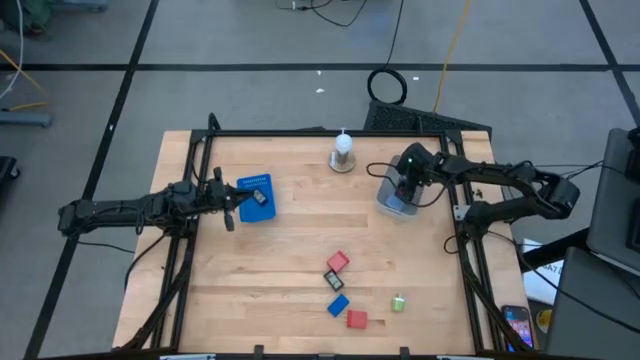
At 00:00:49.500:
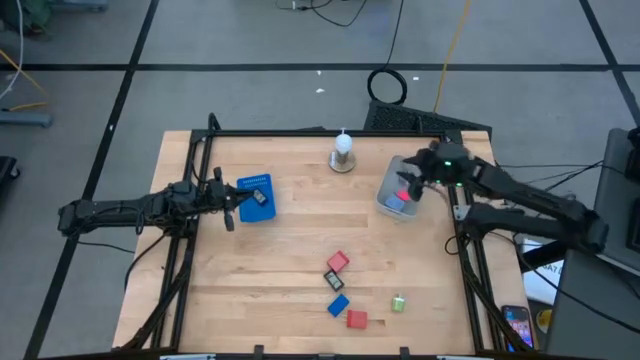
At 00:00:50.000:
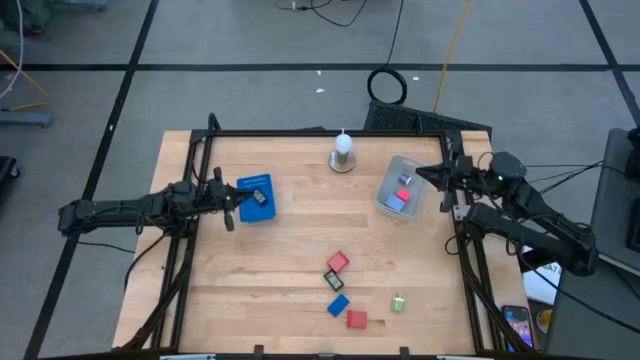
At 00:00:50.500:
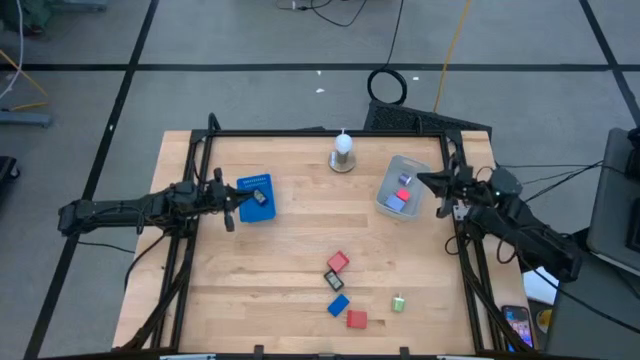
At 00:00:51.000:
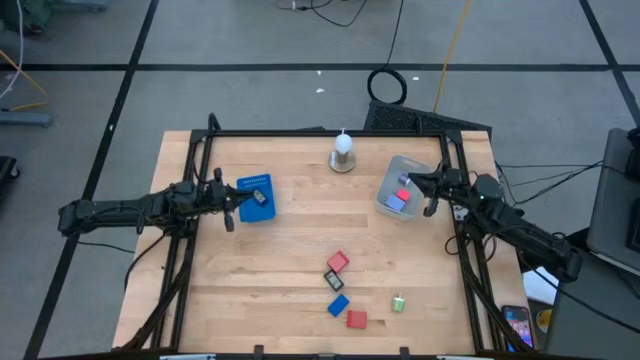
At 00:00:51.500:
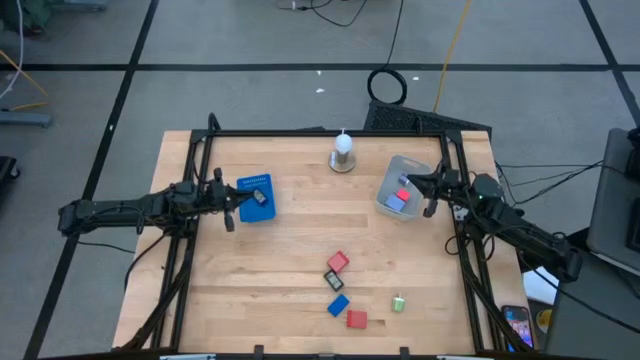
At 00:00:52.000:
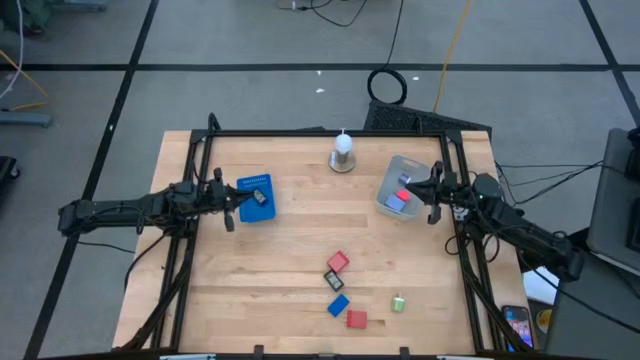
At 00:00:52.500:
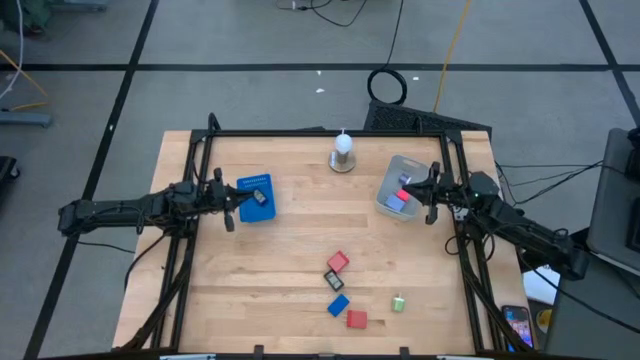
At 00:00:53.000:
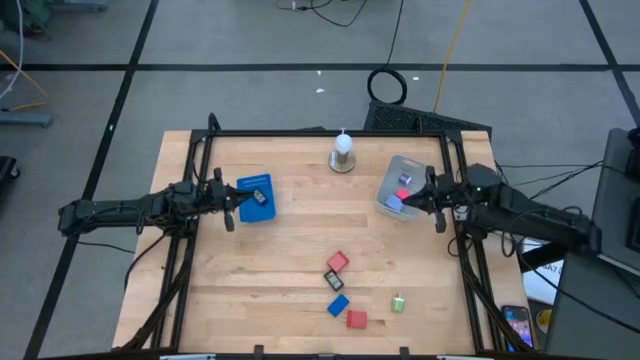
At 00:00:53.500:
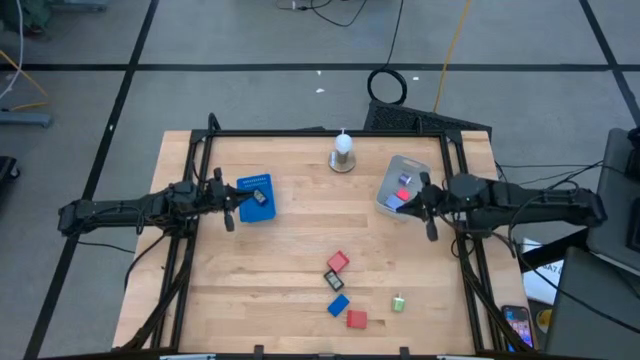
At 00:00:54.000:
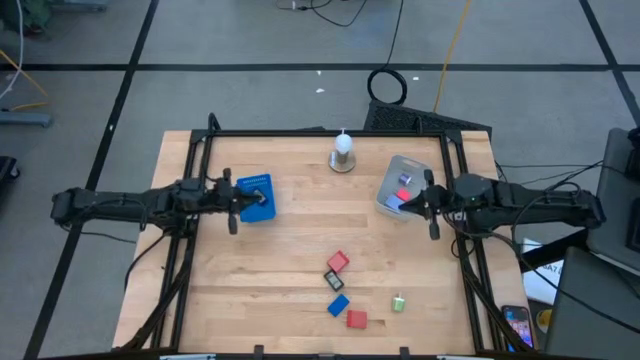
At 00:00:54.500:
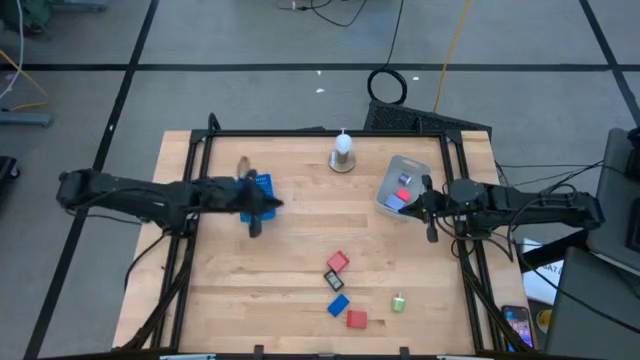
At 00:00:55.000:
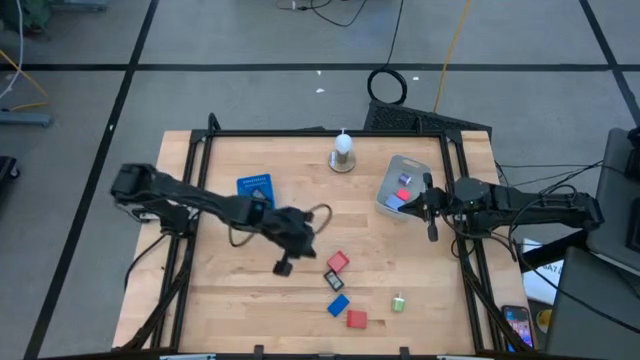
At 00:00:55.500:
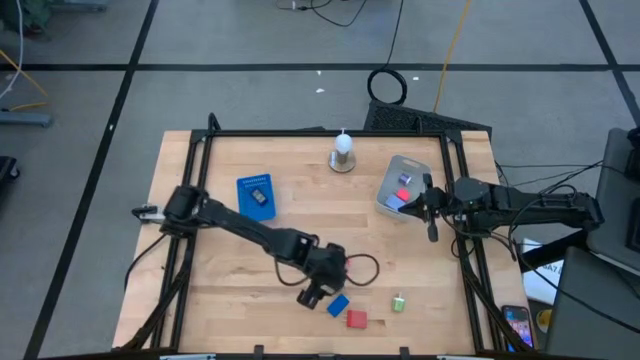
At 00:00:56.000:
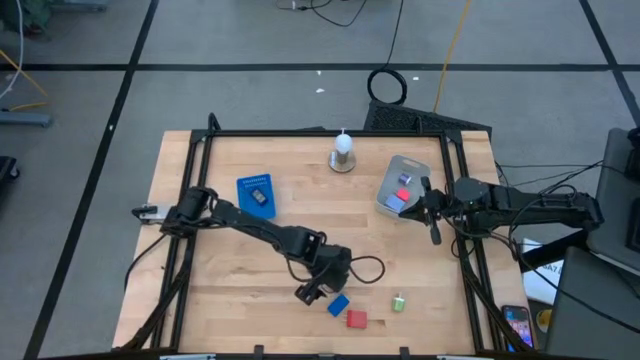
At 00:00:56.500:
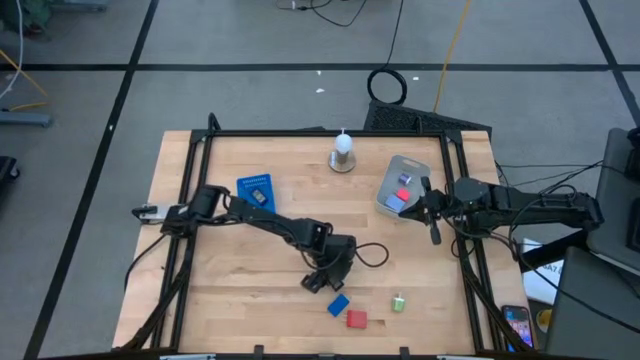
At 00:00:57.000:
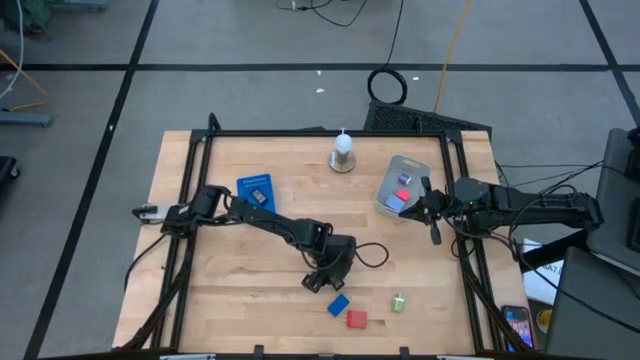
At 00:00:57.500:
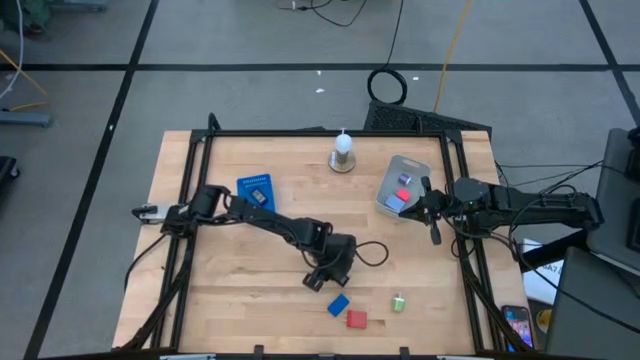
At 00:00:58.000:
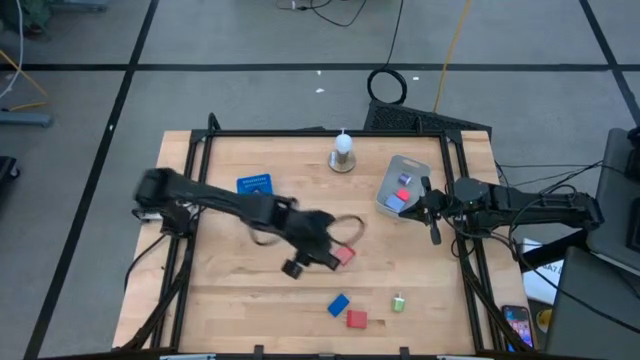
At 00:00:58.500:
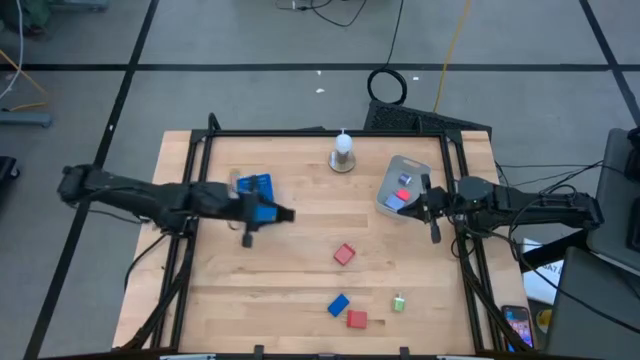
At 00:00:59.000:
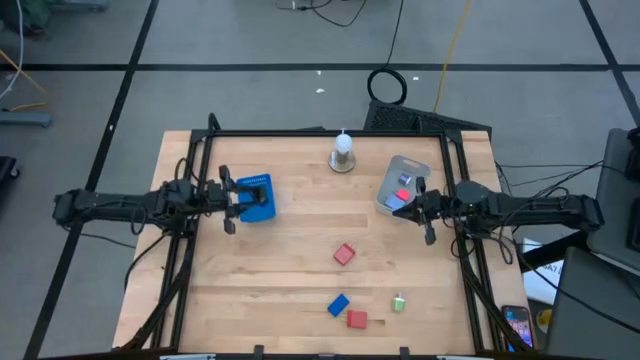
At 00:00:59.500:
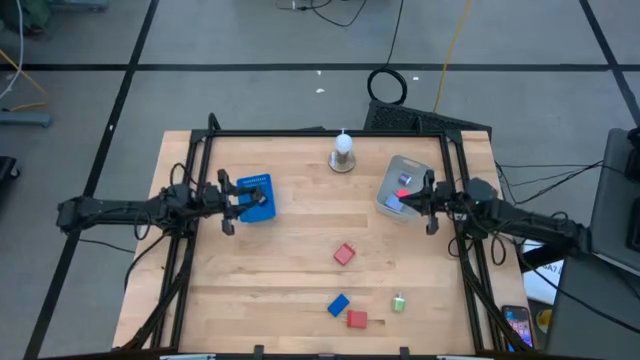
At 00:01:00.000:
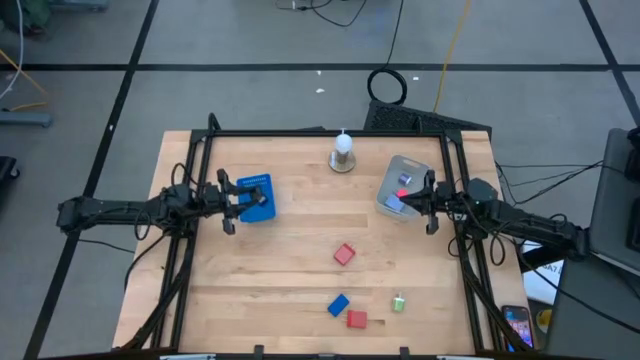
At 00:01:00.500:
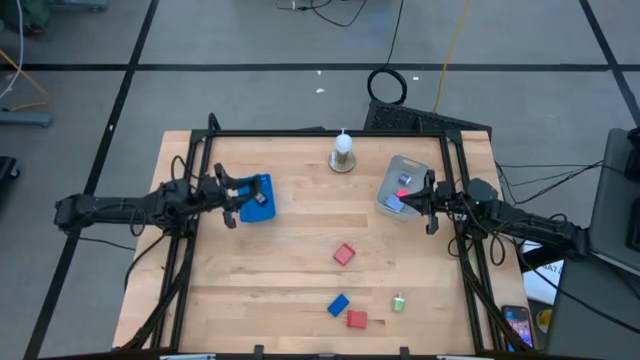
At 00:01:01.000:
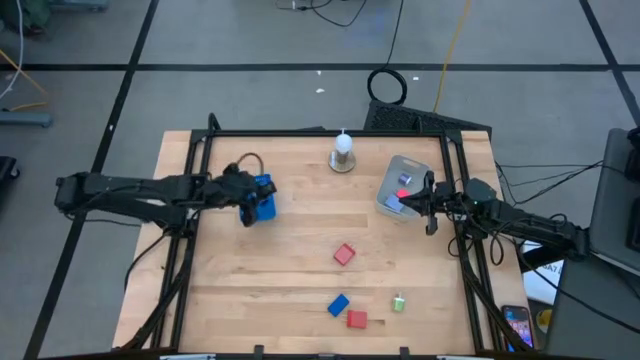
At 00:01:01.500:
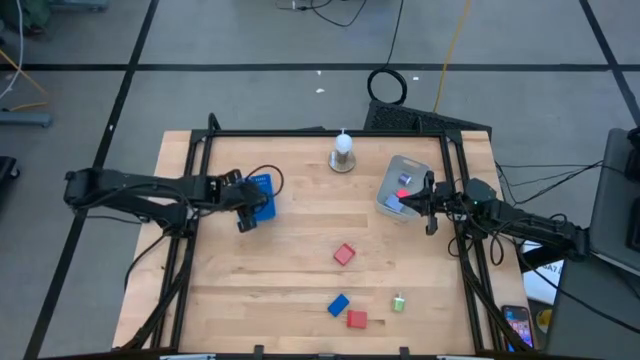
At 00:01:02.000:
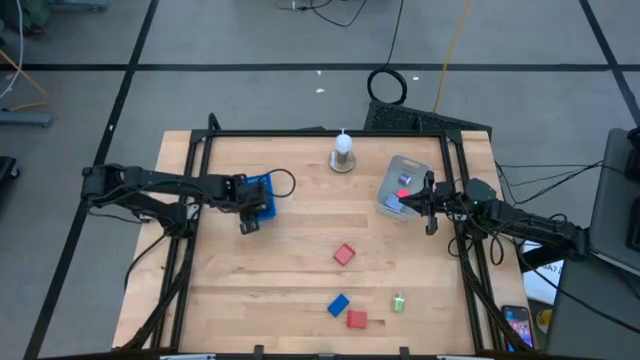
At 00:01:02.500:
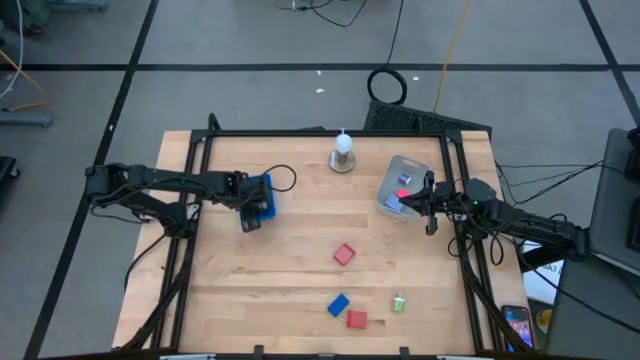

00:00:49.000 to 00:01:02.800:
Task: Pick & Place Office items
Put the black digital clock into the blue bin

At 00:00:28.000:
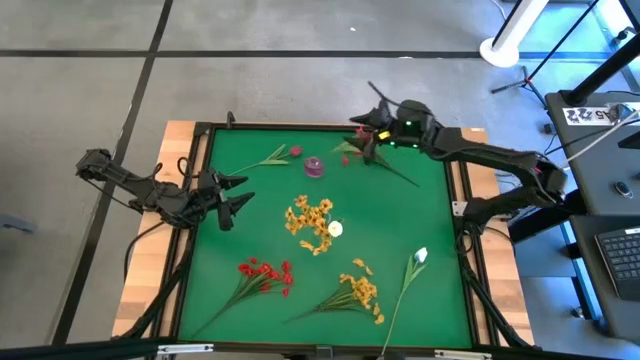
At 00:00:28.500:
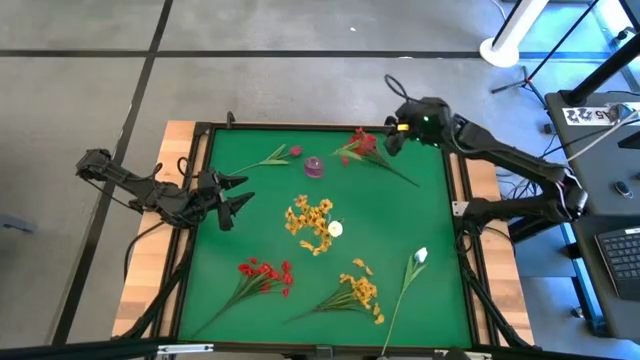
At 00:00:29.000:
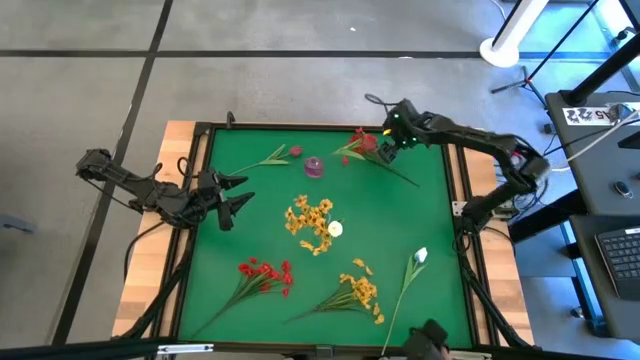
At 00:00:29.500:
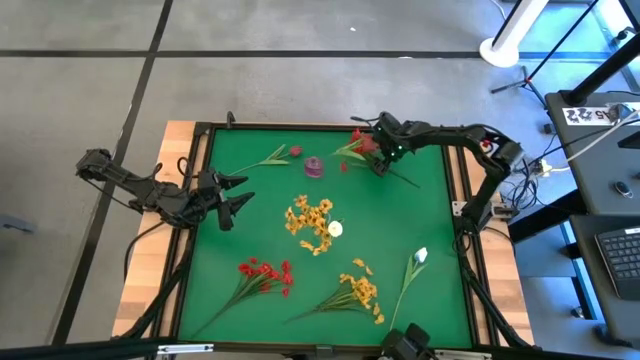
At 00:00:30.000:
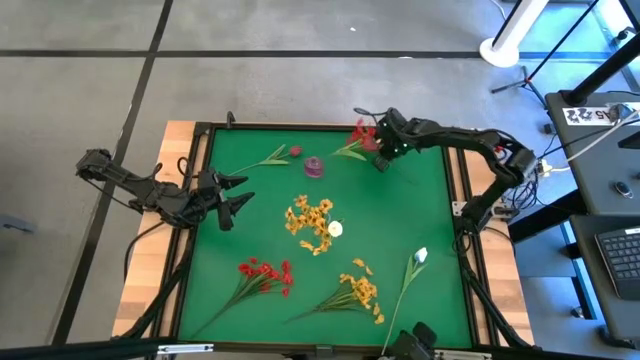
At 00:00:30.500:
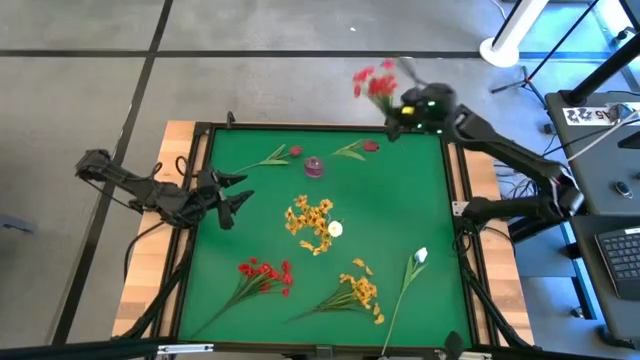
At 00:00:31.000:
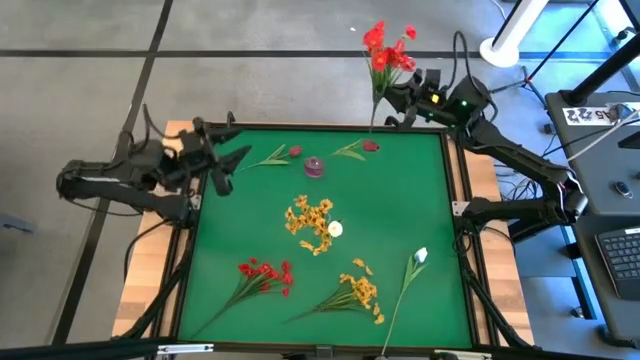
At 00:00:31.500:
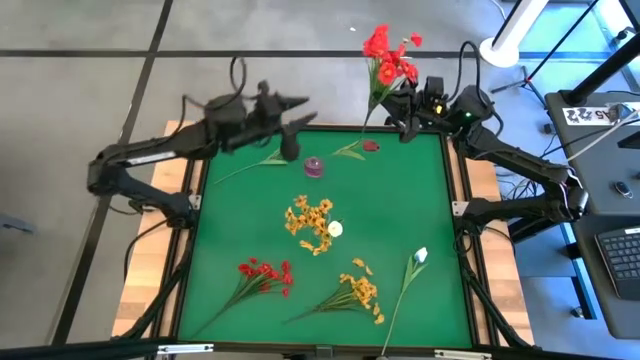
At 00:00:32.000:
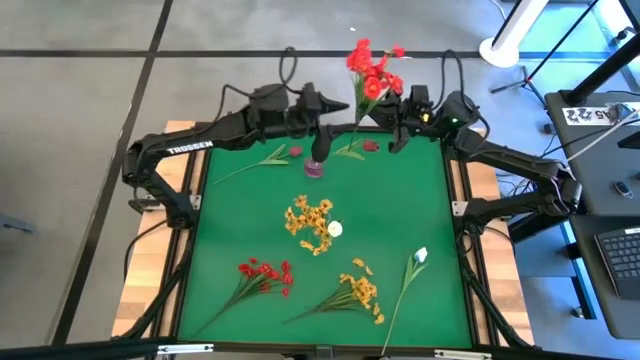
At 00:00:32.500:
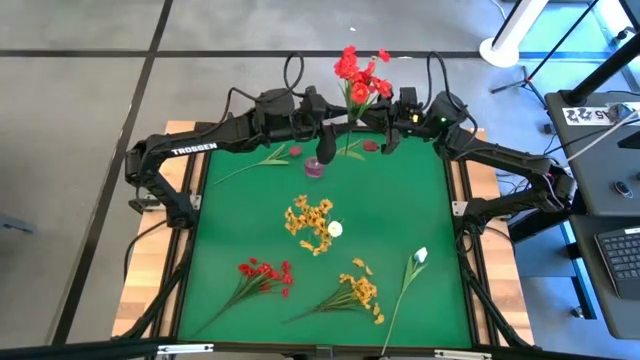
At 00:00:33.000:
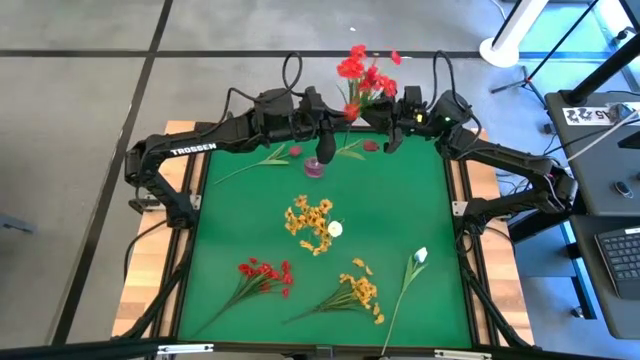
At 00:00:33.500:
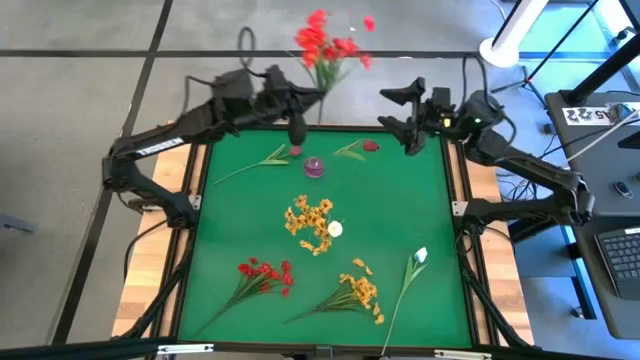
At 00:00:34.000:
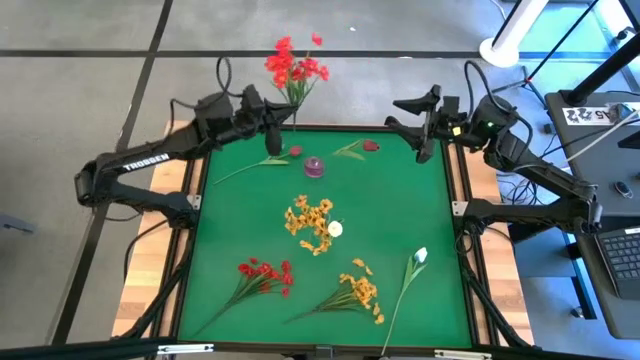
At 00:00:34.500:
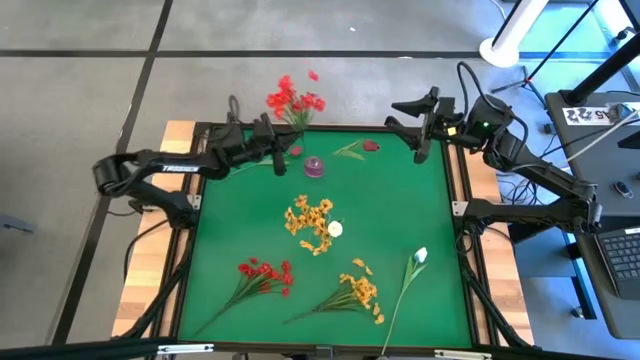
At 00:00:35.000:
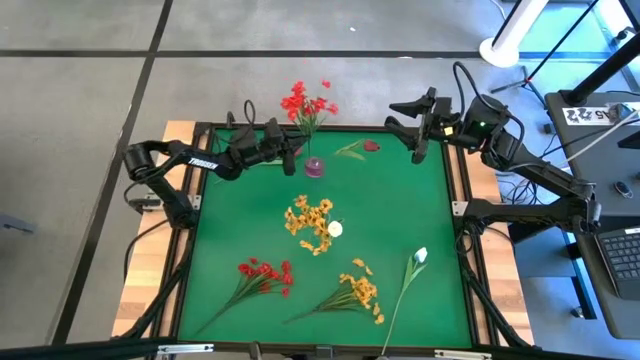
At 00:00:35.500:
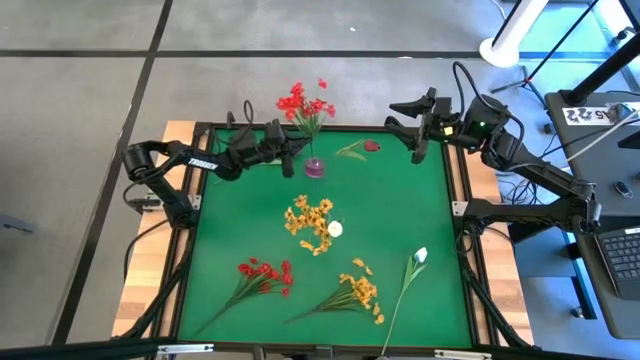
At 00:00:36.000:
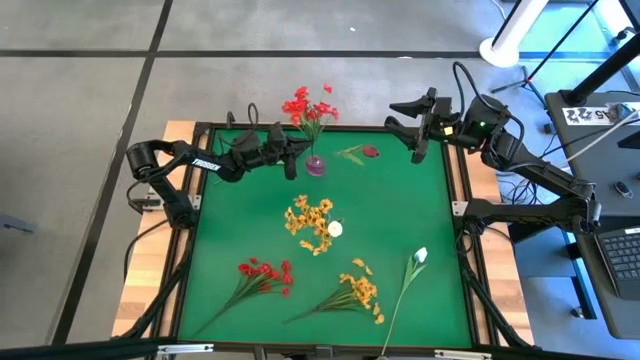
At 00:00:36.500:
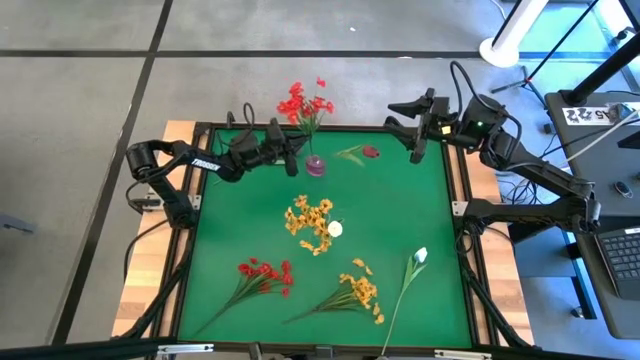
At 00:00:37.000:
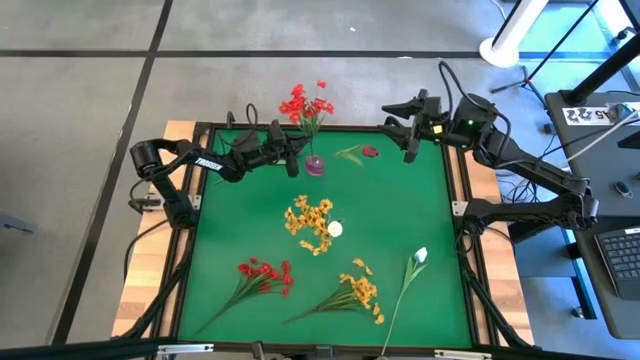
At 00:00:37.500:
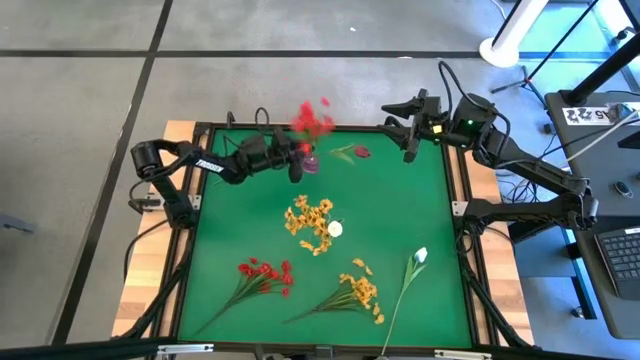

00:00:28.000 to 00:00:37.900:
Task: Sort flowers into vase by color
Put the top red flowers into the purple vase
